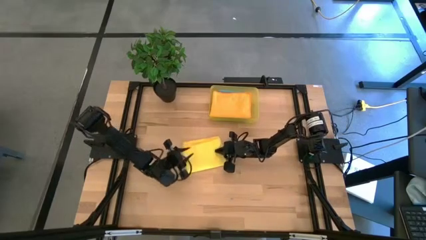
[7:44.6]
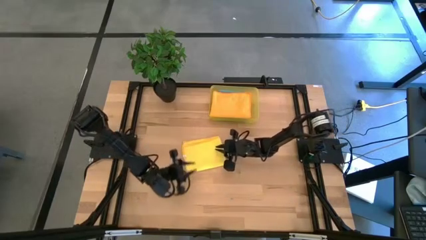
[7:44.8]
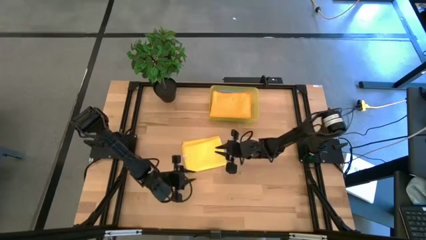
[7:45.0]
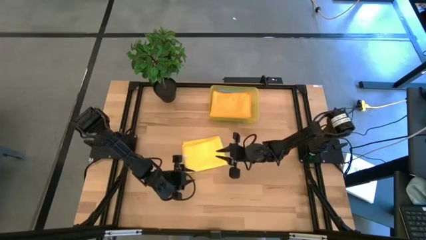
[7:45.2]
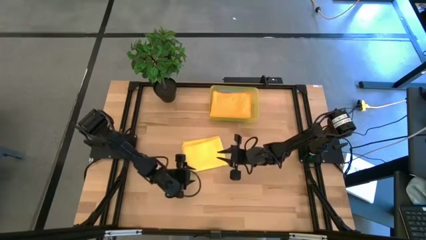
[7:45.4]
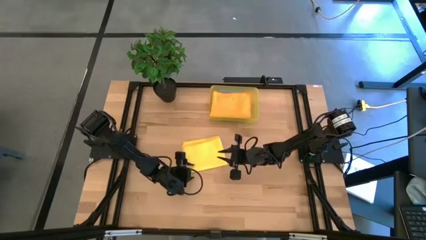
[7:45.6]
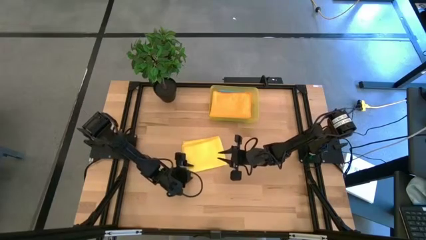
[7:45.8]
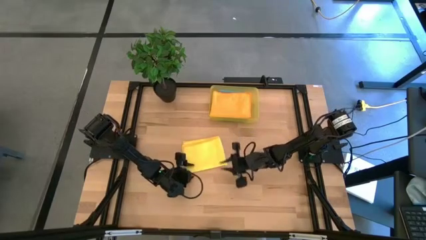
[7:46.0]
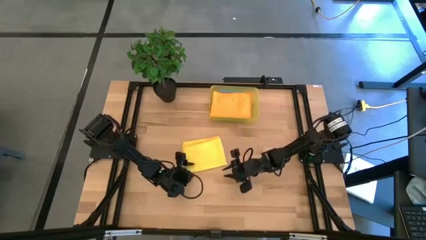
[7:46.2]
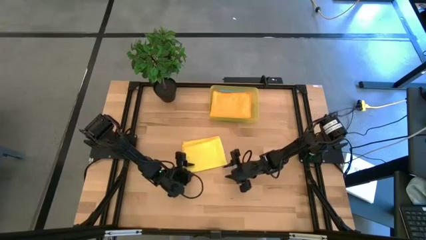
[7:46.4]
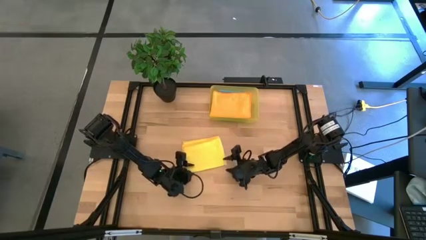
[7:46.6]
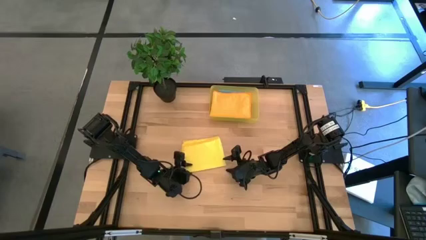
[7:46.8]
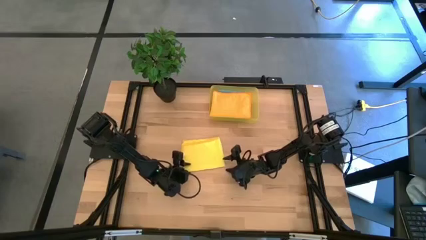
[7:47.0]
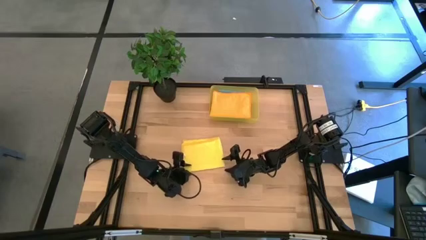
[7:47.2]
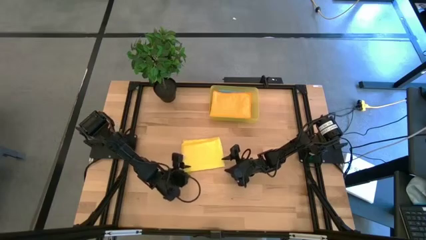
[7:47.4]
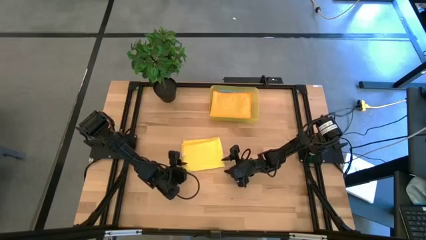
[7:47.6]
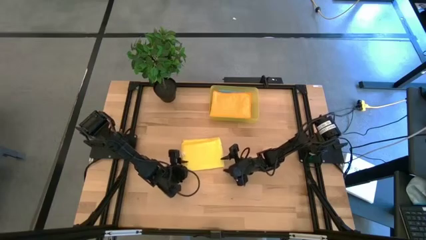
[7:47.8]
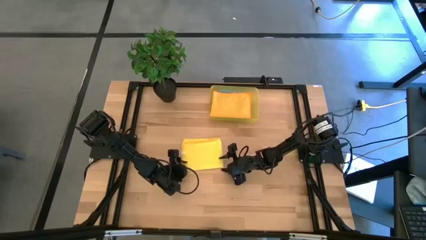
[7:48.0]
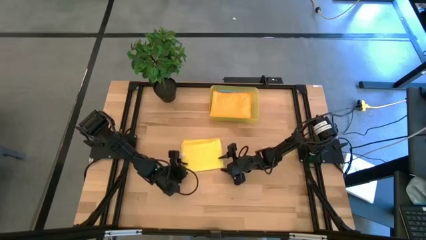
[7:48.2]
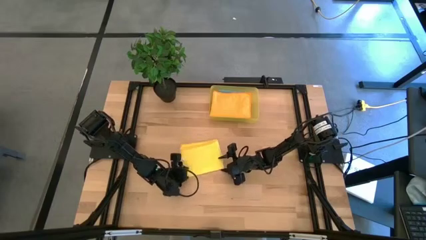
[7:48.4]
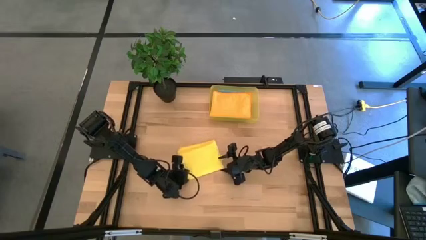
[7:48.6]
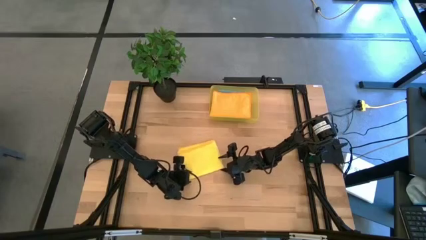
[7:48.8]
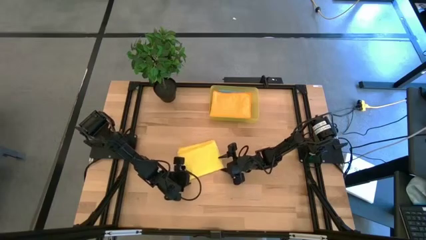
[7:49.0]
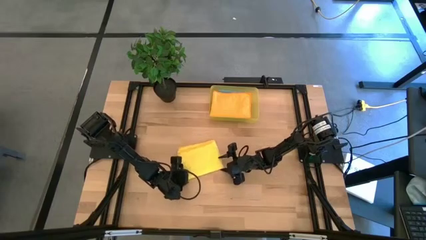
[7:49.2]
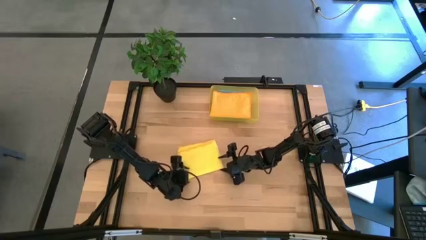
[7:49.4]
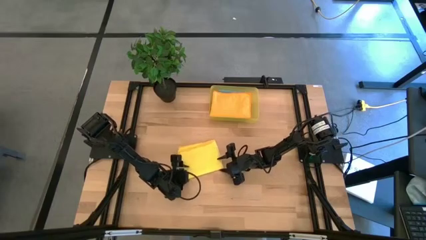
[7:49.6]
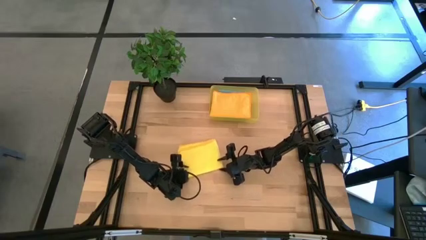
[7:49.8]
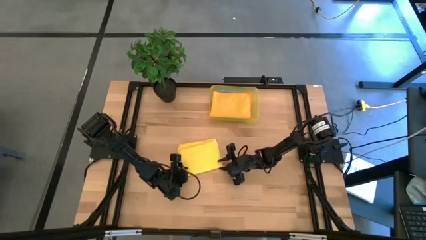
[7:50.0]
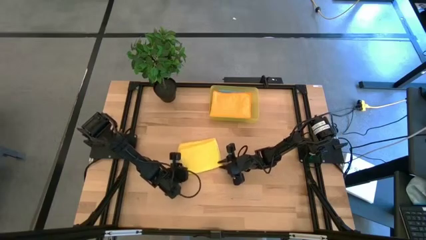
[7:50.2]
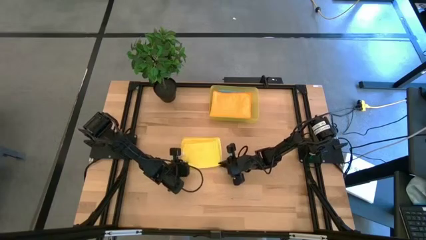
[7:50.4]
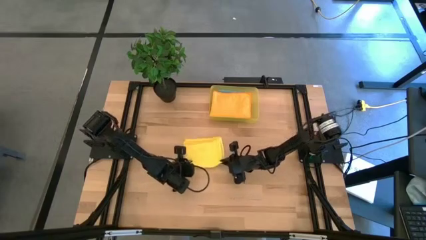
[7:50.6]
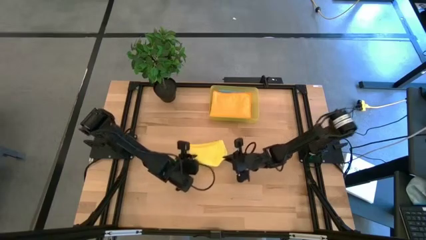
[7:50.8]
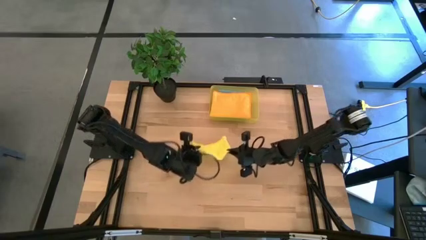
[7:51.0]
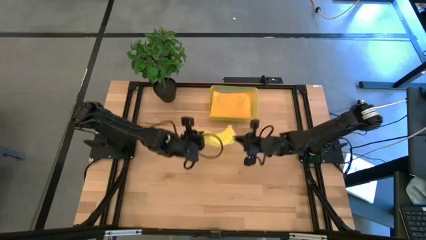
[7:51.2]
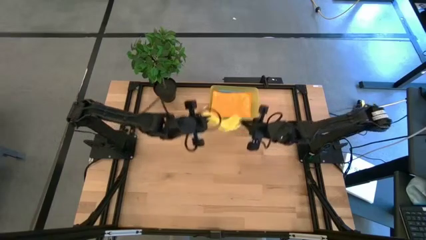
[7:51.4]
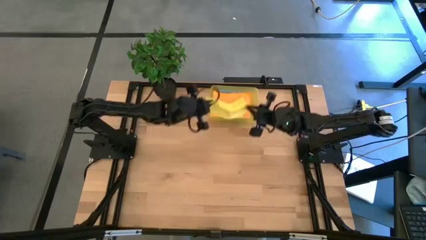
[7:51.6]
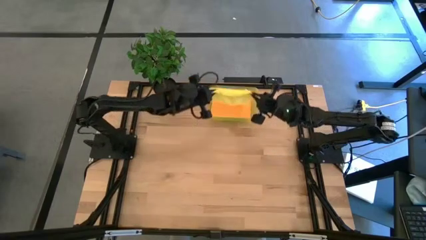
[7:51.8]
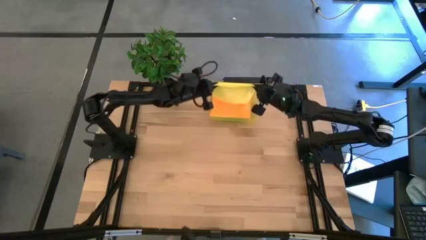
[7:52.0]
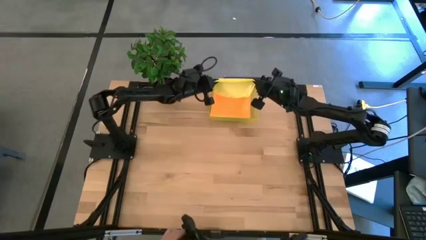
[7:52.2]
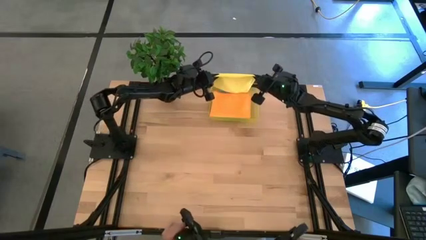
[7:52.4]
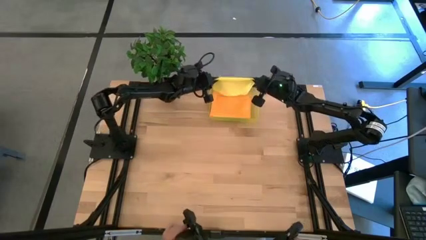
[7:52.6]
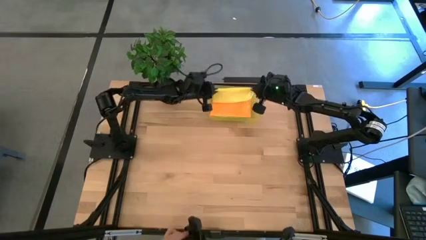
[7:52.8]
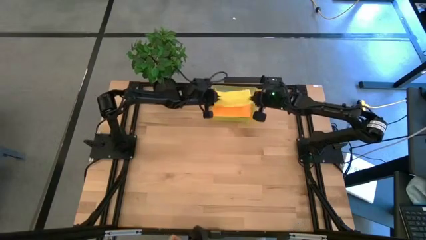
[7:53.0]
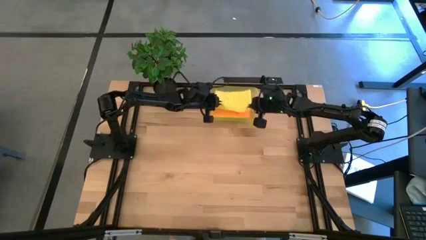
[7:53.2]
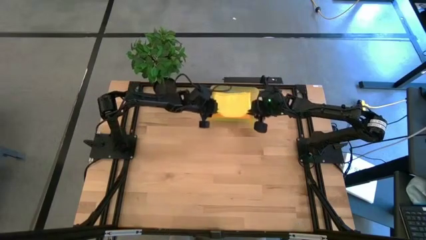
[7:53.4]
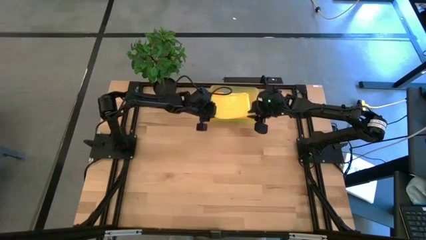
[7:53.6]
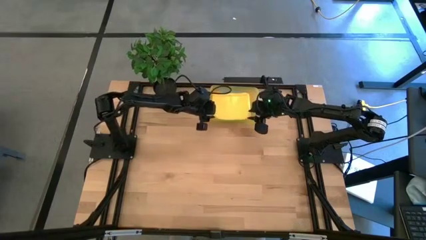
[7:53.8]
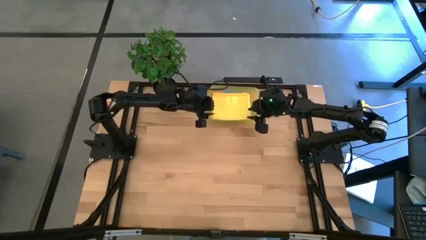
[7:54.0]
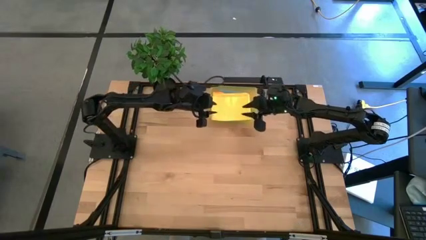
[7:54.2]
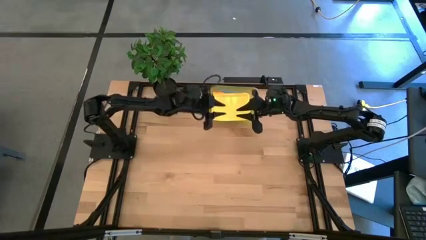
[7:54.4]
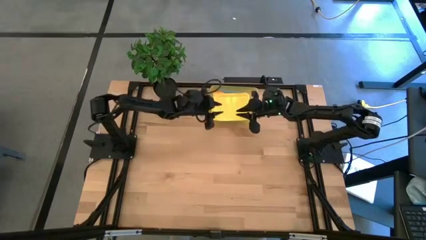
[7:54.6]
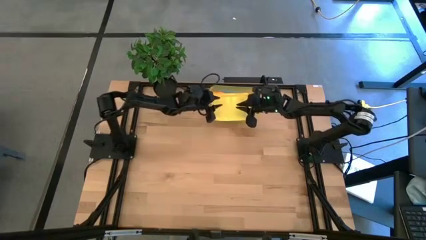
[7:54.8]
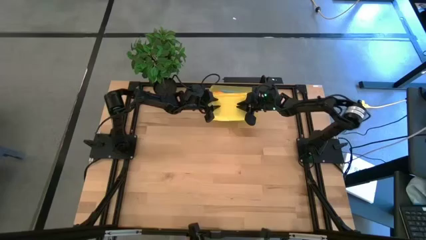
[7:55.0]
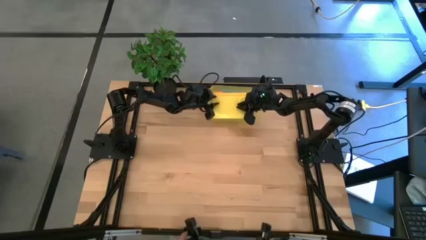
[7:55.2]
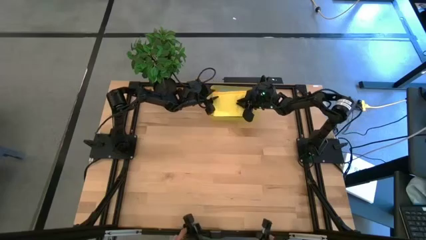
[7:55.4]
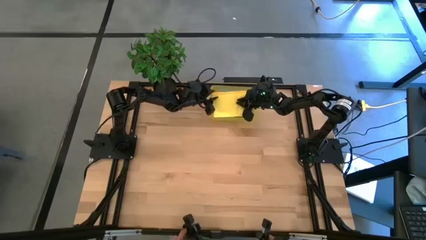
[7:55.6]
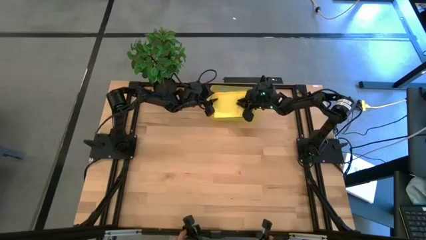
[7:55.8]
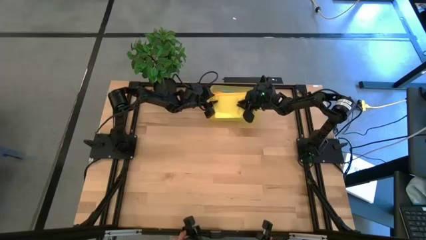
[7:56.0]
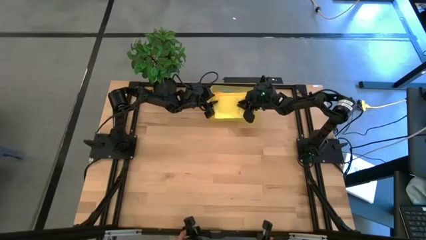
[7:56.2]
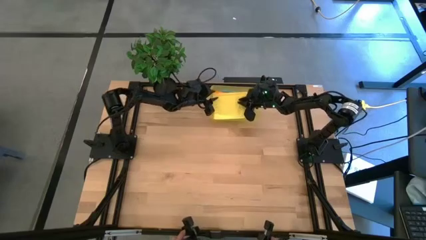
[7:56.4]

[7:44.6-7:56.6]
Task: Fold microfiber towels
Put the folded yellow microfiber towel into the yellow bin
